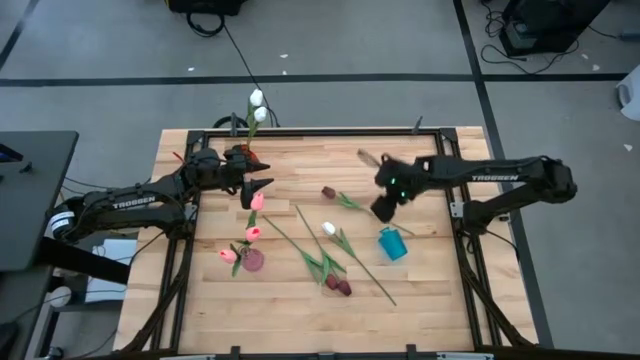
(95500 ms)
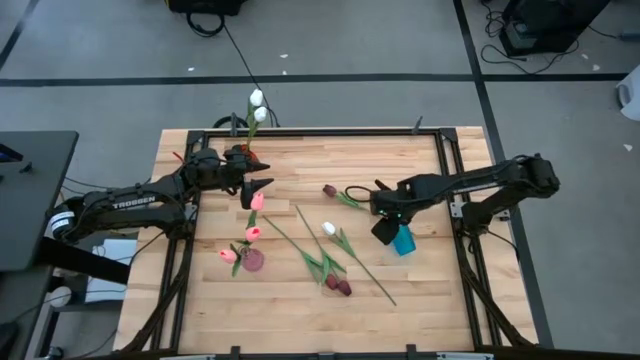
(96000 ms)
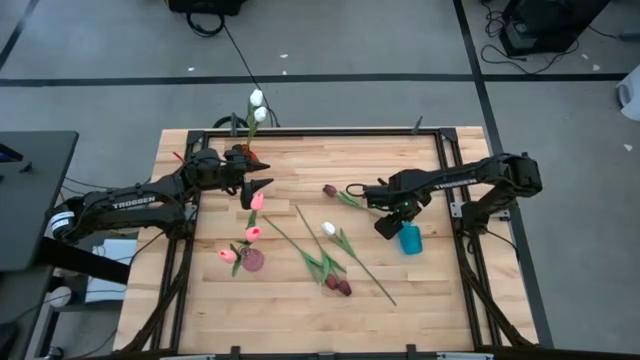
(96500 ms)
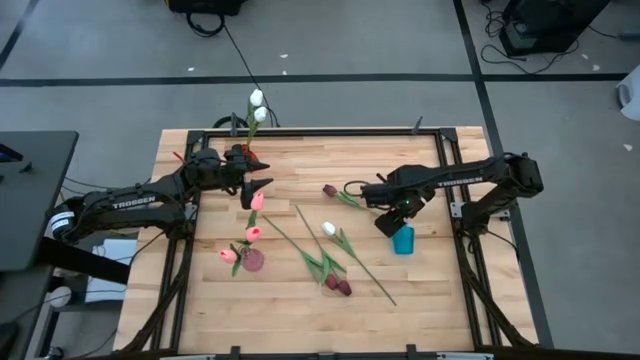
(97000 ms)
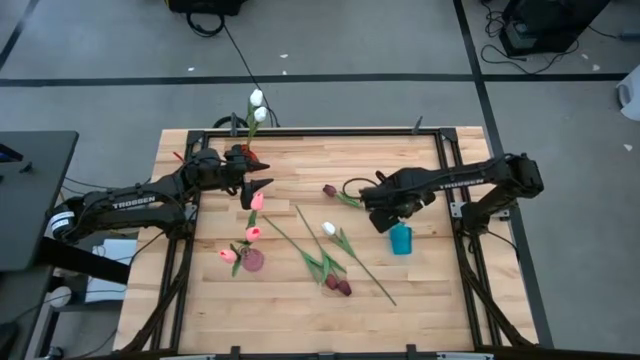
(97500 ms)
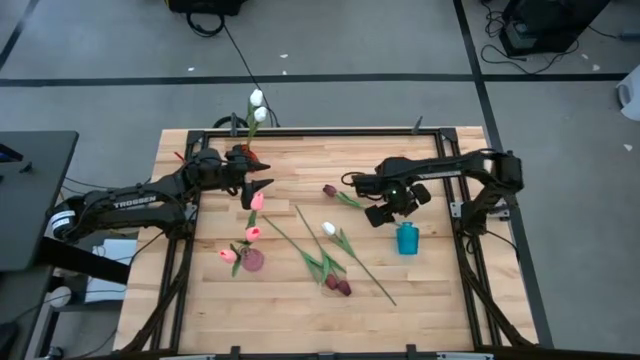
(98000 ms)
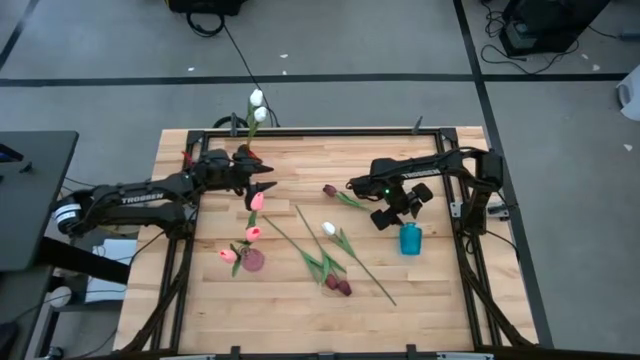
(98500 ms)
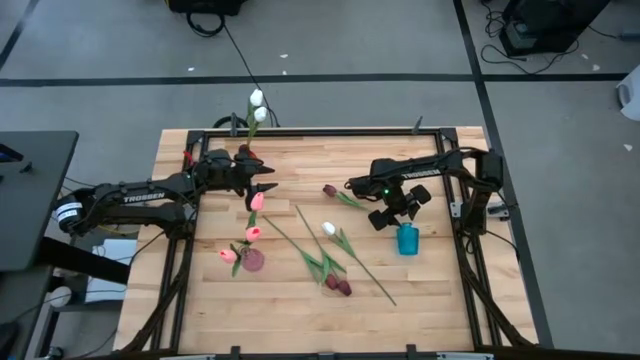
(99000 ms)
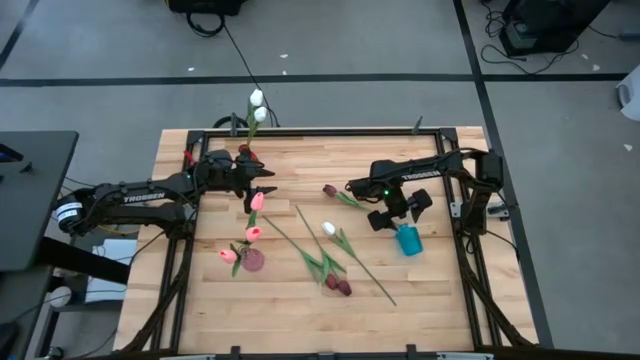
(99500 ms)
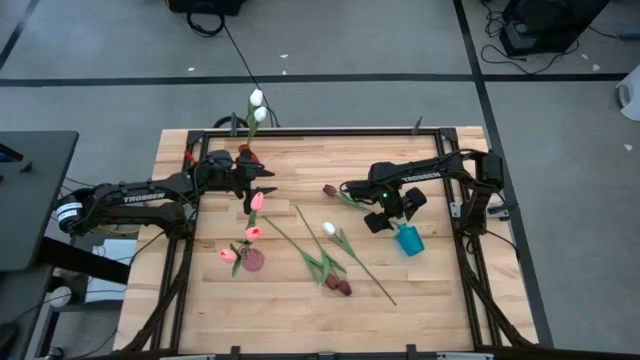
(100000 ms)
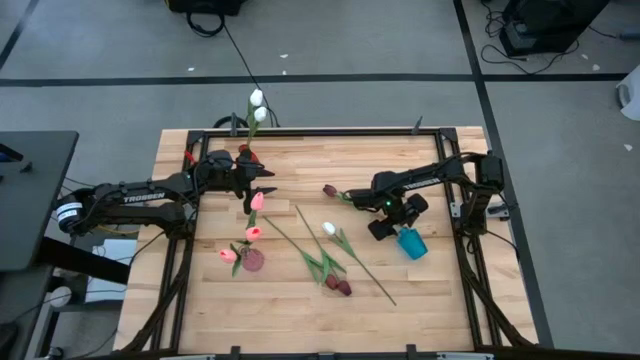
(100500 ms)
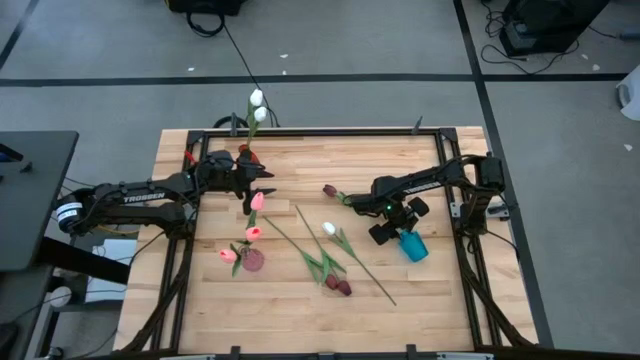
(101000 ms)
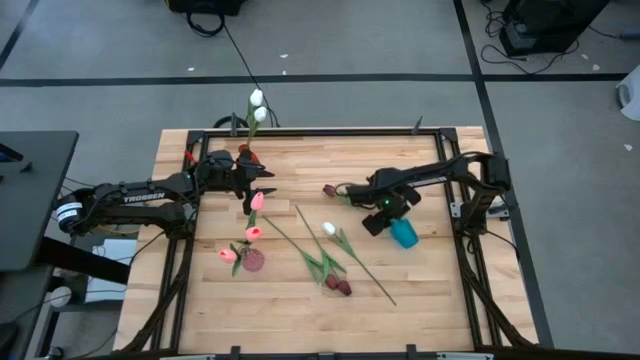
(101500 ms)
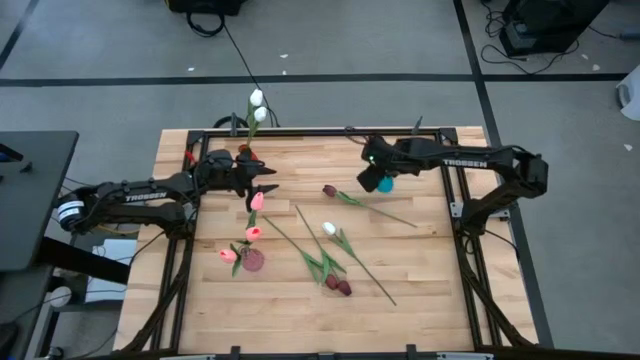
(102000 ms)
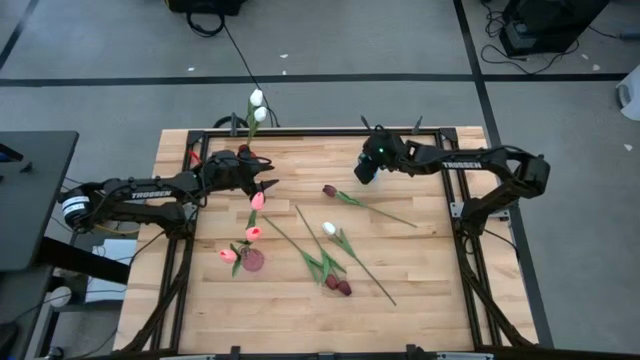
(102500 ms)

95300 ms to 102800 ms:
Task: Sort flowers into vase by color
Adjust the blue vase

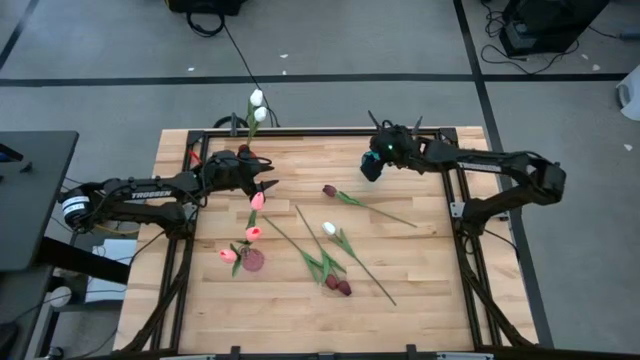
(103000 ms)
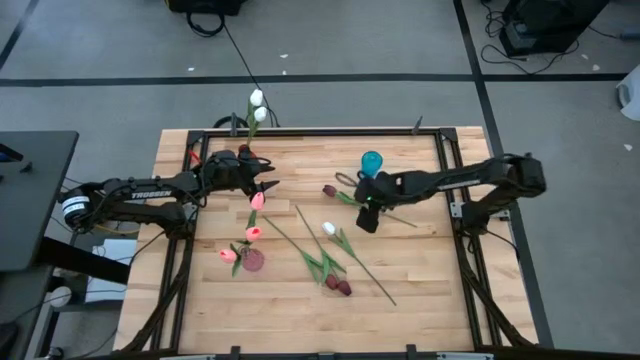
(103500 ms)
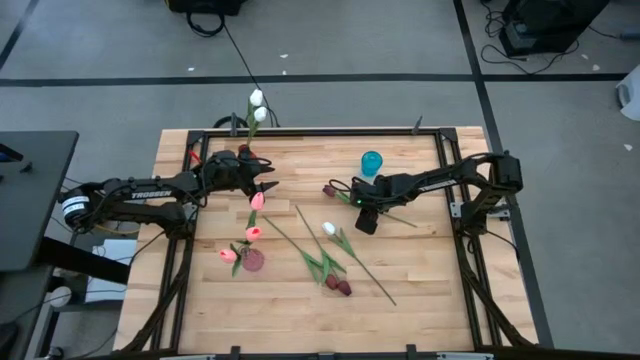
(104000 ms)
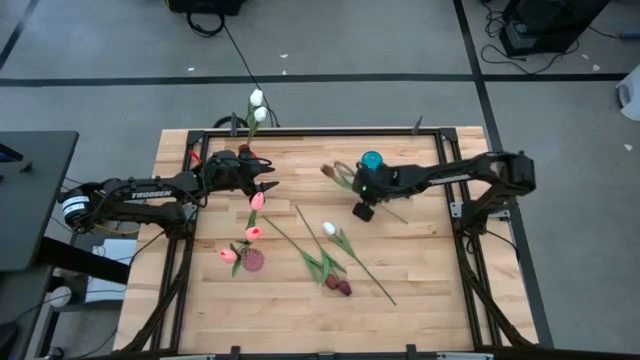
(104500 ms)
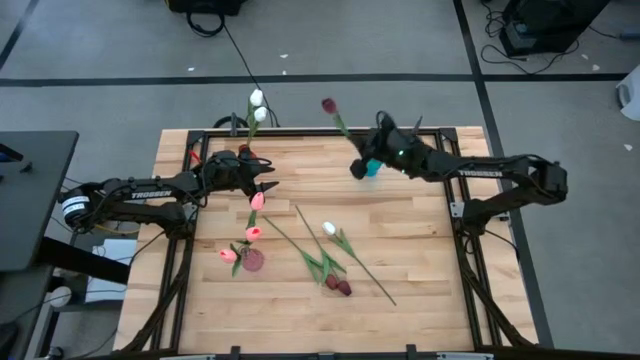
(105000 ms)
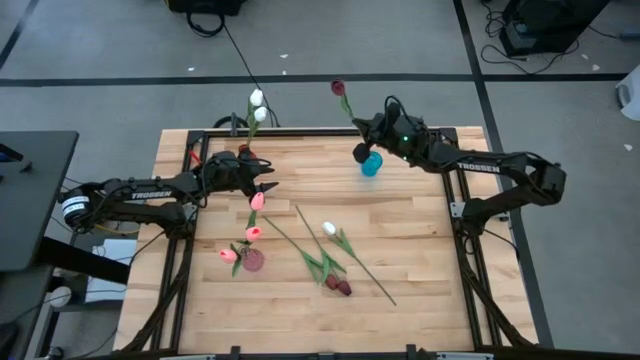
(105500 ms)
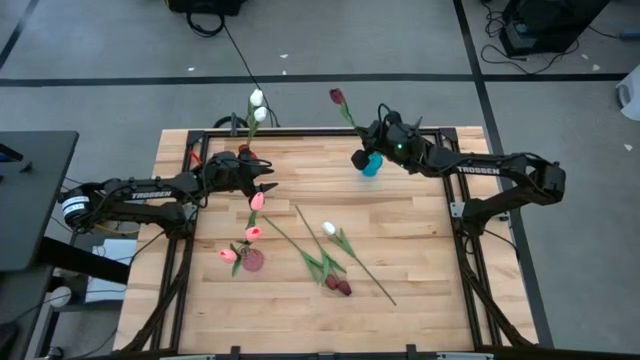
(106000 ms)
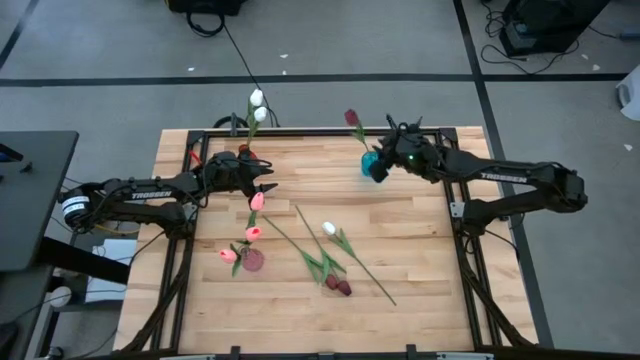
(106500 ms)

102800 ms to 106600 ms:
Put the top red flower into the blue vase

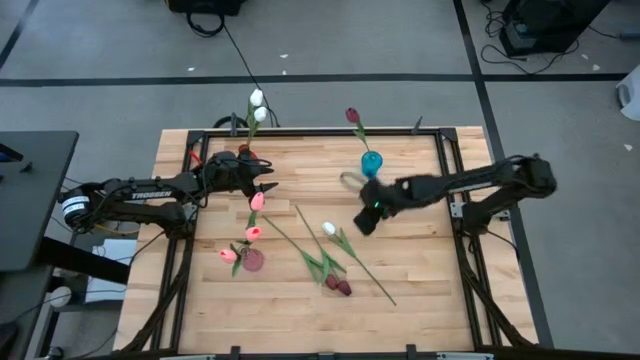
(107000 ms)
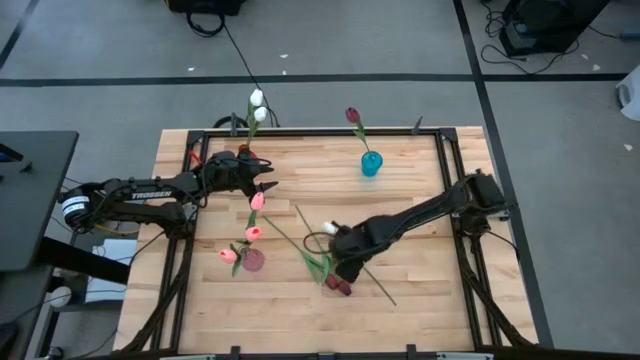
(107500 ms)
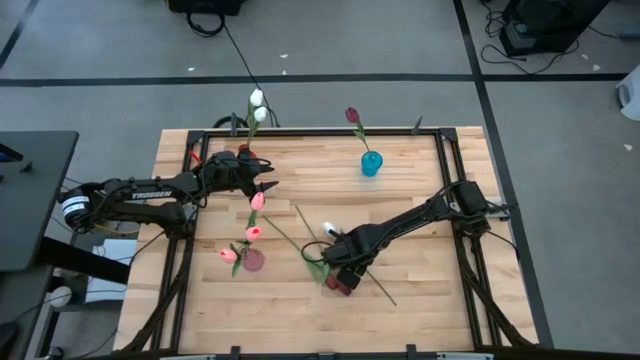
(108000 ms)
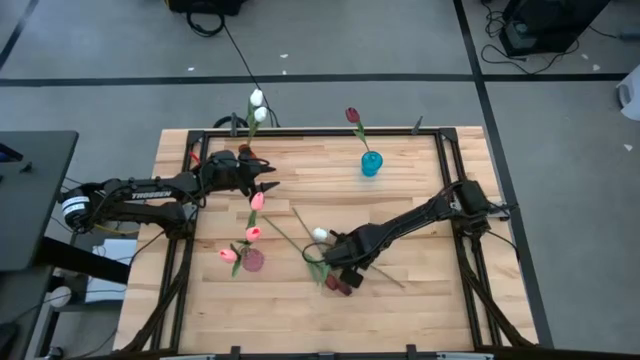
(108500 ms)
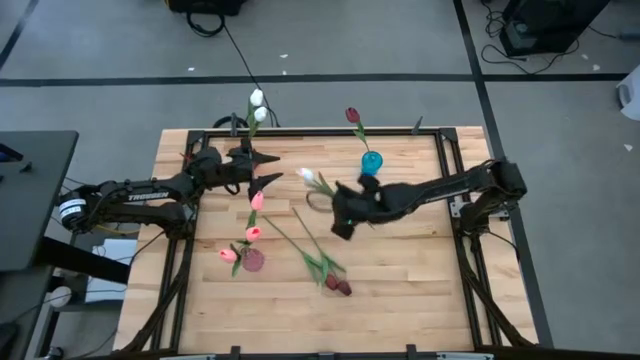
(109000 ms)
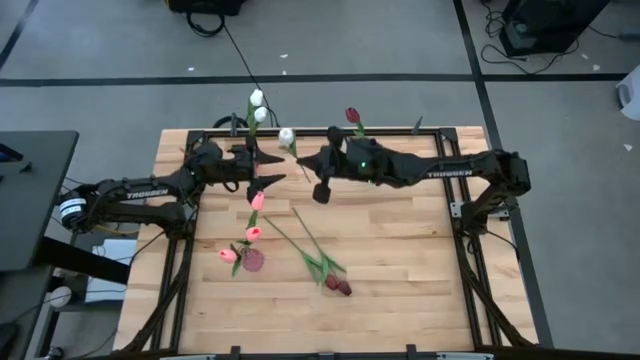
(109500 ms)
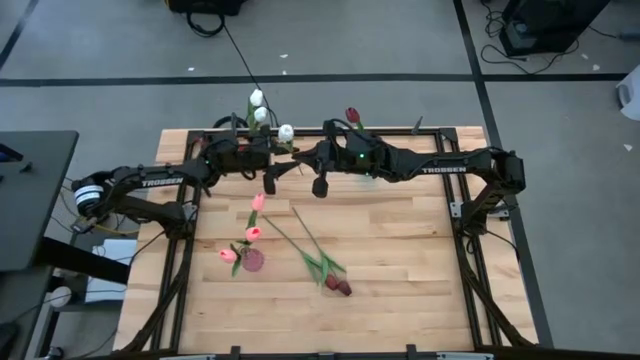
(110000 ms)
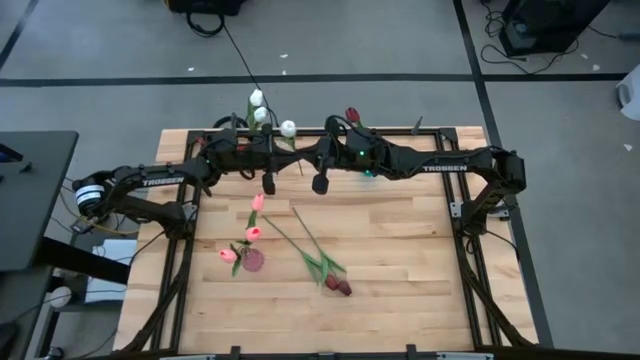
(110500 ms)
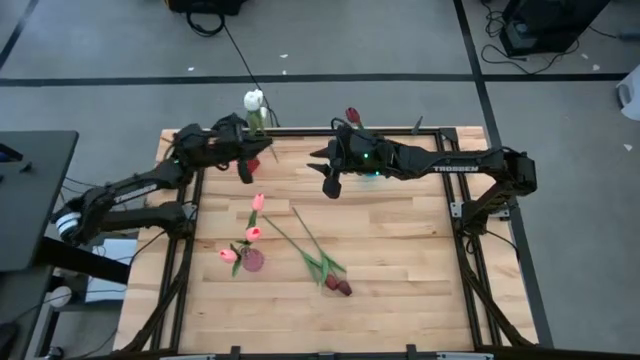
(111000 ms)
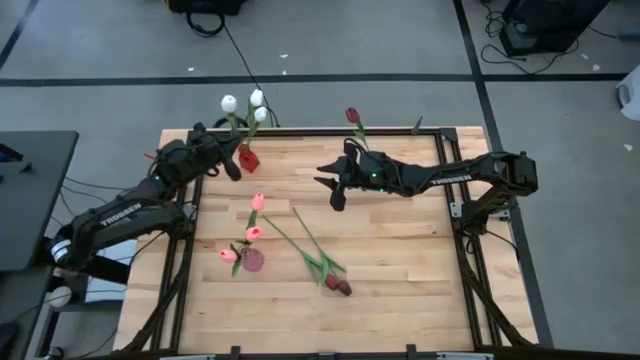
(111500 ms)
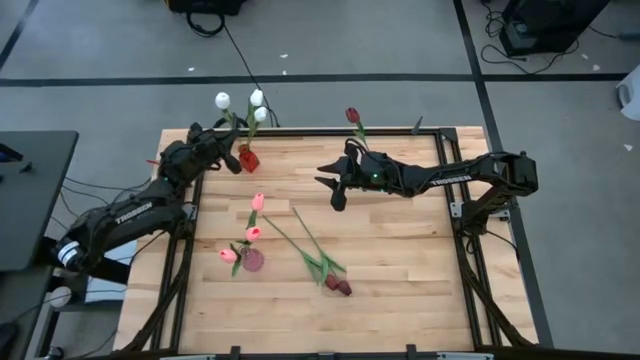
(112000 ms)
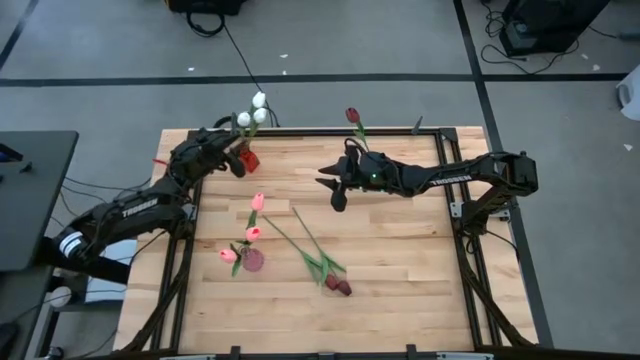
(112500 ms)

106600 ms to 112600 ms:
Put the white flower into the red vase

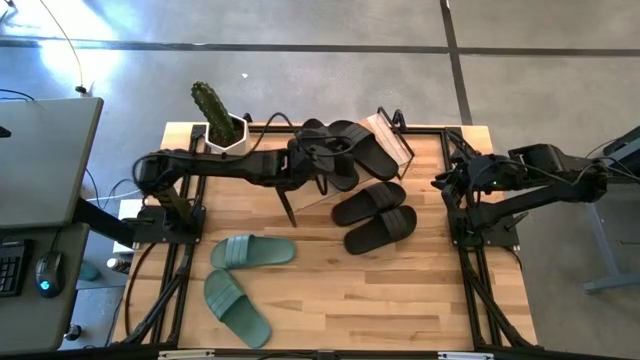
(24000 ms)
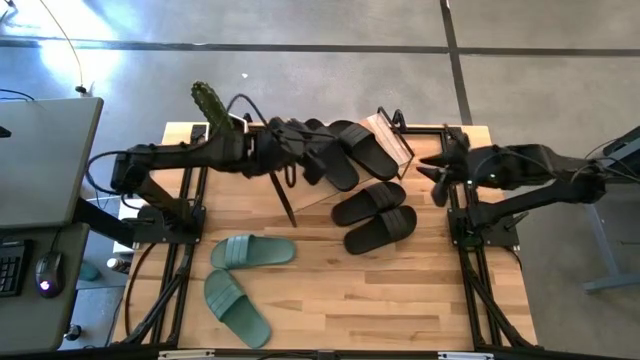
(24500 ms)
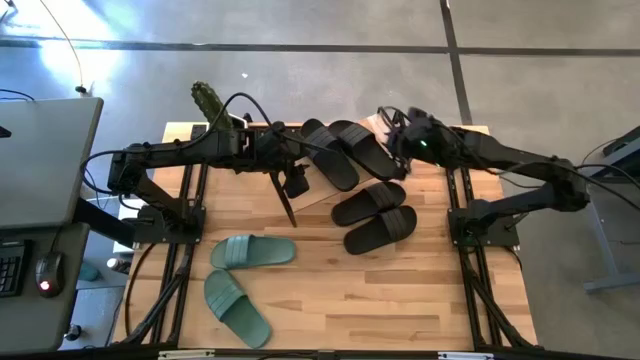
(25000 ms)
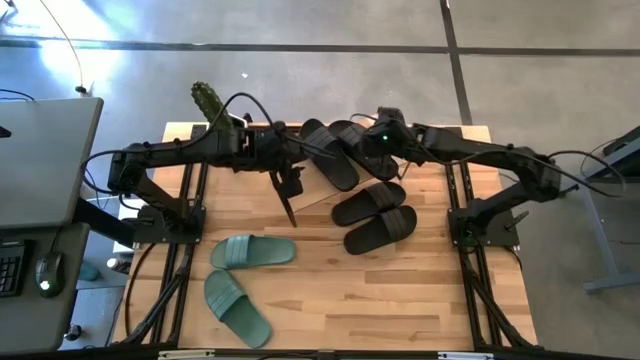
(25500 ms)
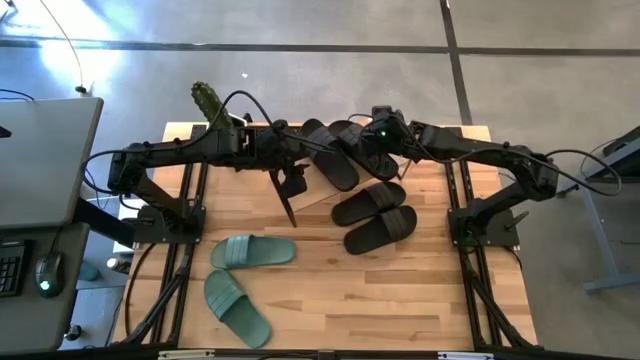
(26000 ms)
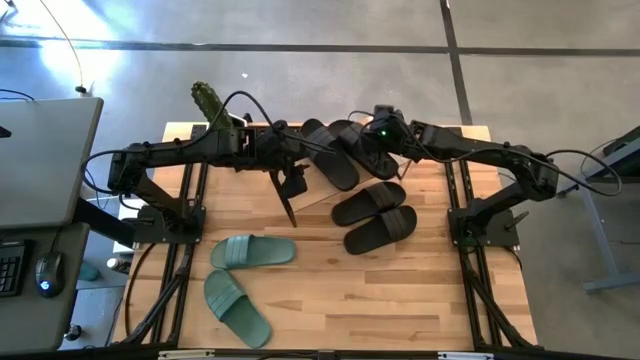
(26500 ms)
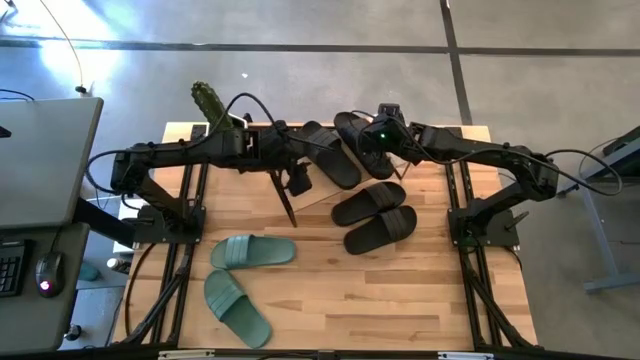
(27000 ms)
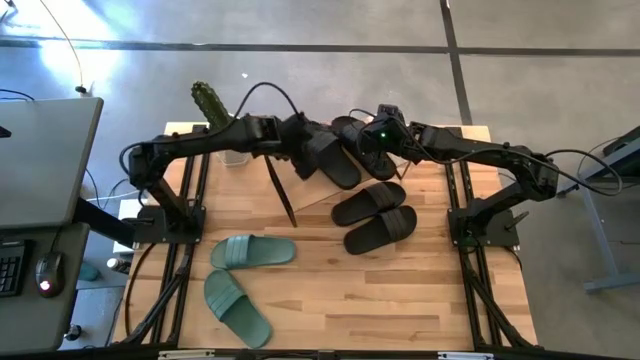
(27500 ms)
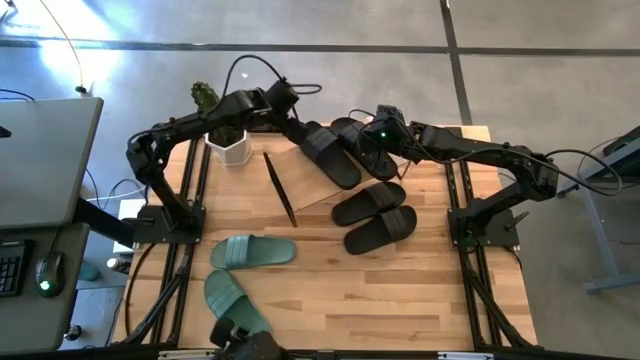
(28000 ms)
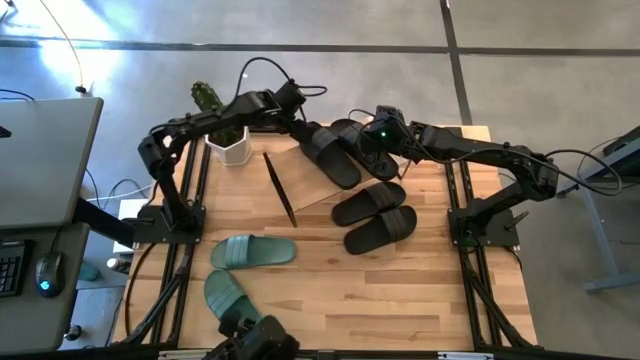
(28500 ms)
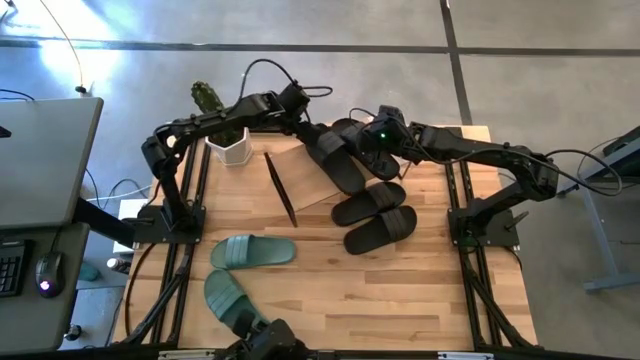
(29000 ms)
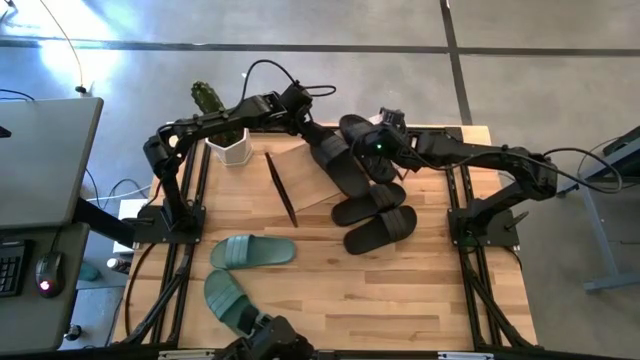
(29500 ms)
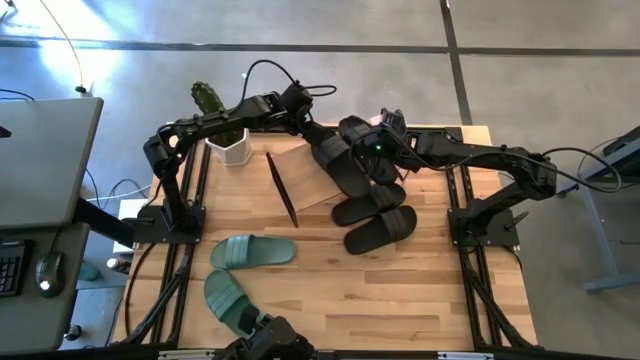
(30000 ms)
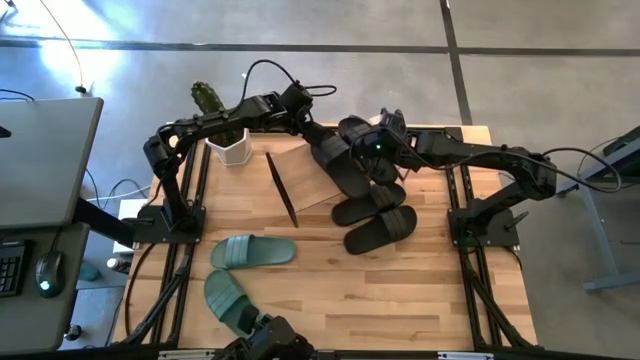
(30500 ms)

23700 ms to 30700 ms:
Task: Pick and place slides into the shelf
Adjust the black slipper on the shelf
